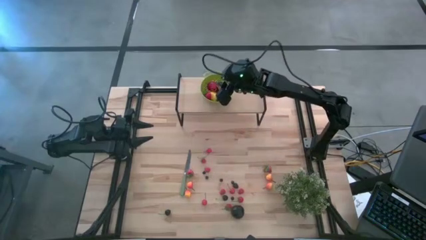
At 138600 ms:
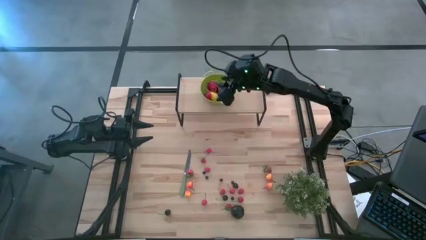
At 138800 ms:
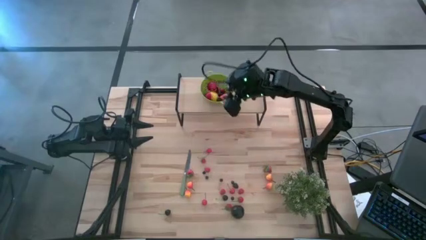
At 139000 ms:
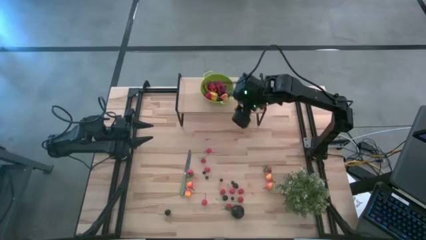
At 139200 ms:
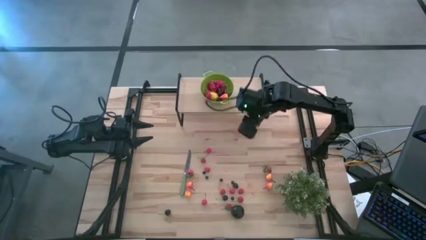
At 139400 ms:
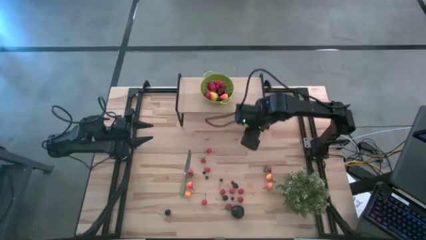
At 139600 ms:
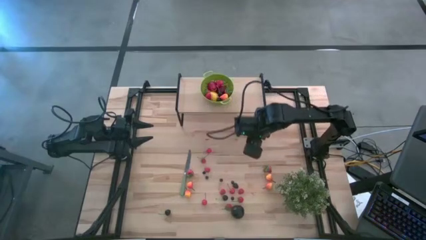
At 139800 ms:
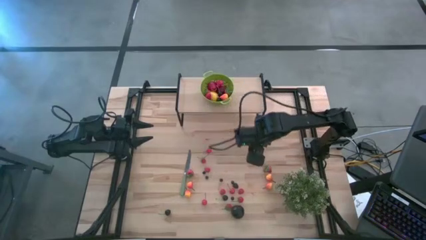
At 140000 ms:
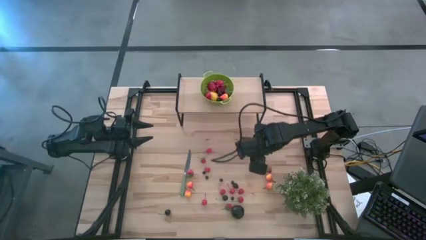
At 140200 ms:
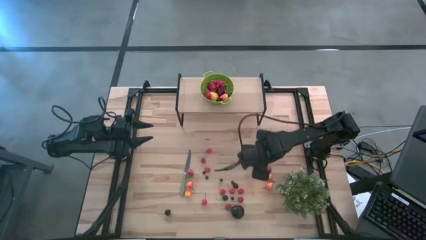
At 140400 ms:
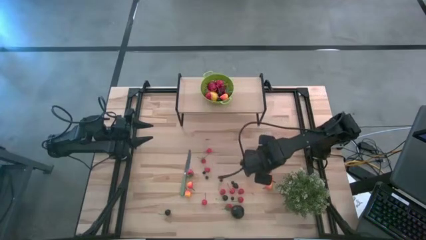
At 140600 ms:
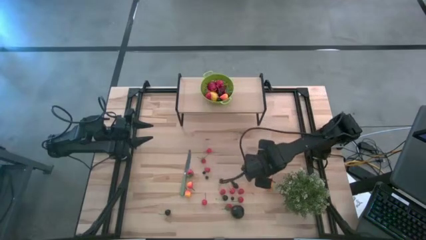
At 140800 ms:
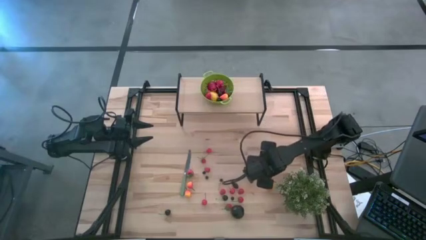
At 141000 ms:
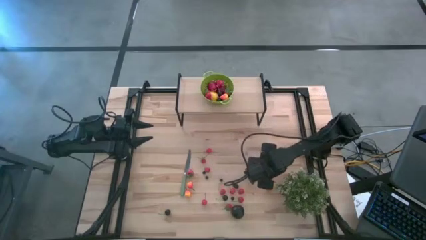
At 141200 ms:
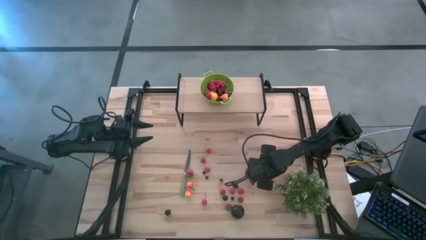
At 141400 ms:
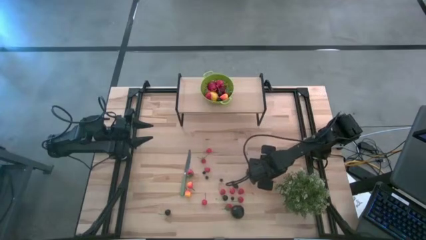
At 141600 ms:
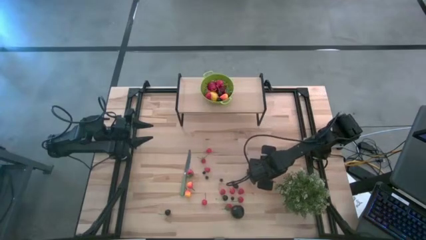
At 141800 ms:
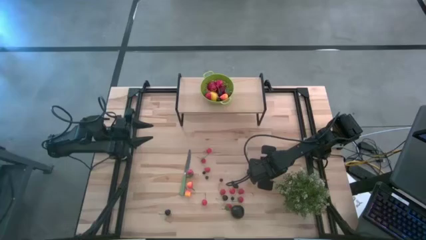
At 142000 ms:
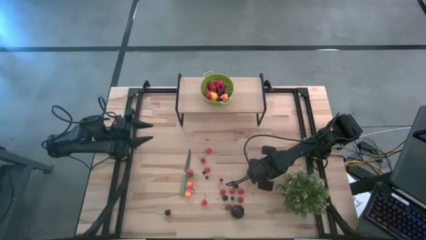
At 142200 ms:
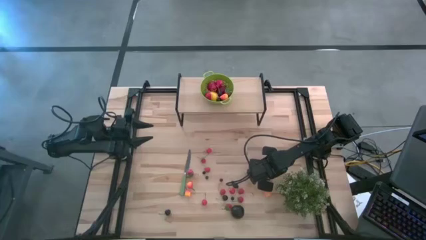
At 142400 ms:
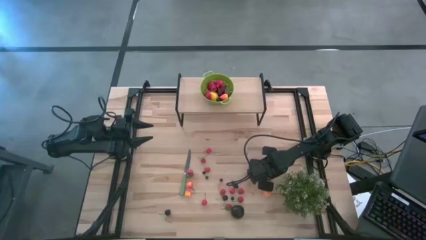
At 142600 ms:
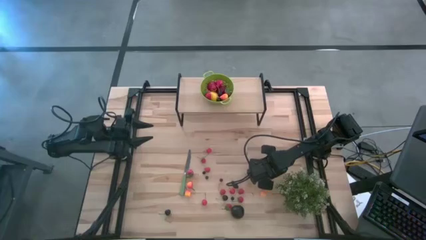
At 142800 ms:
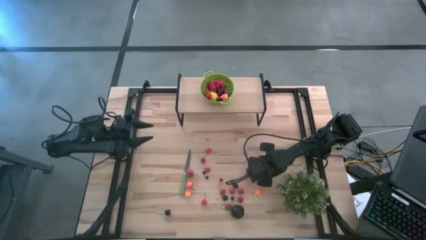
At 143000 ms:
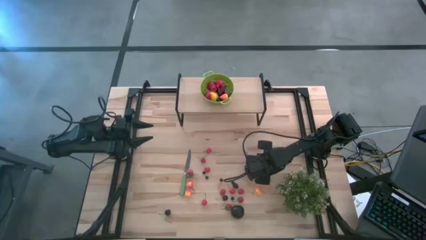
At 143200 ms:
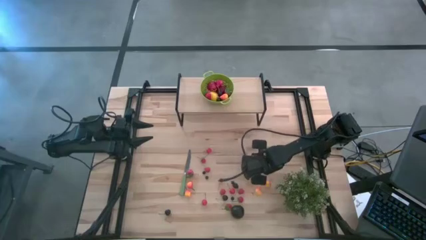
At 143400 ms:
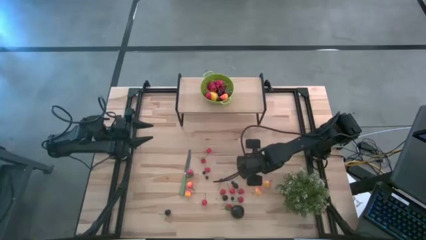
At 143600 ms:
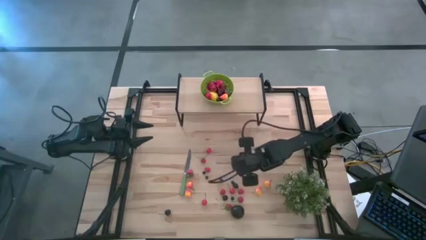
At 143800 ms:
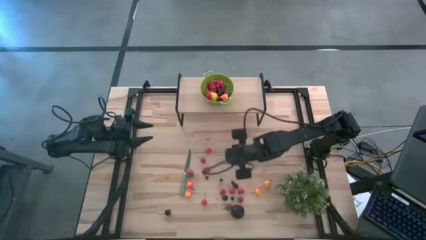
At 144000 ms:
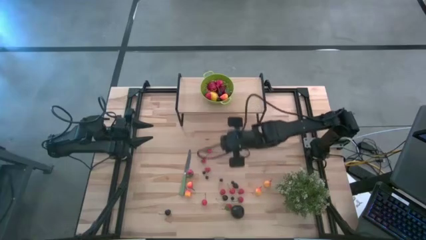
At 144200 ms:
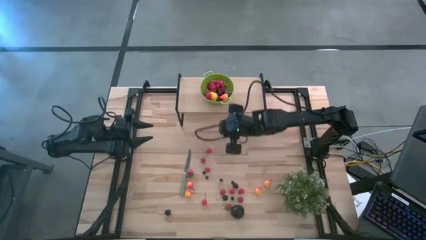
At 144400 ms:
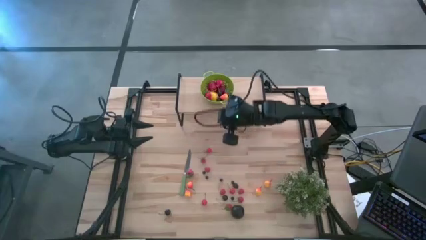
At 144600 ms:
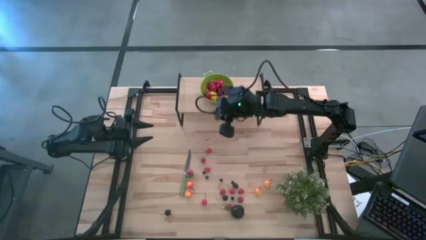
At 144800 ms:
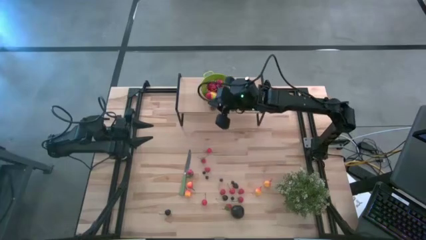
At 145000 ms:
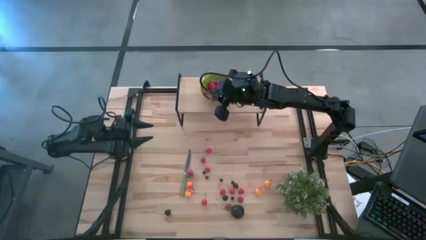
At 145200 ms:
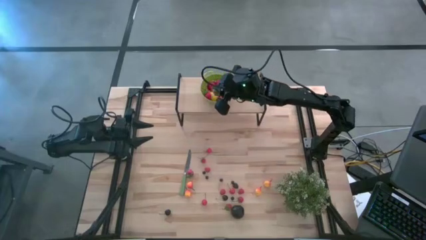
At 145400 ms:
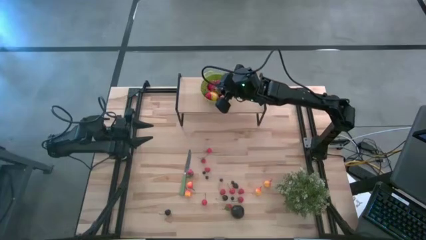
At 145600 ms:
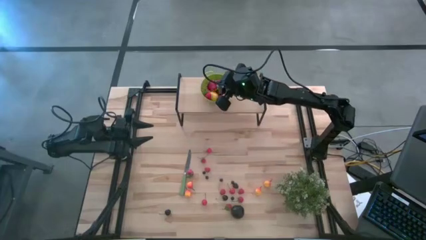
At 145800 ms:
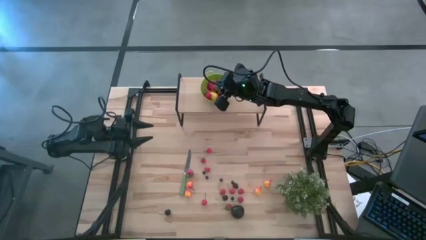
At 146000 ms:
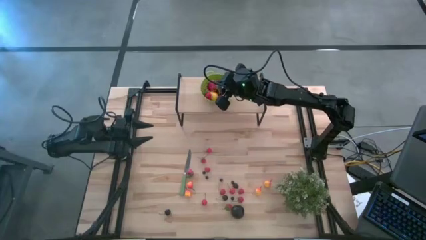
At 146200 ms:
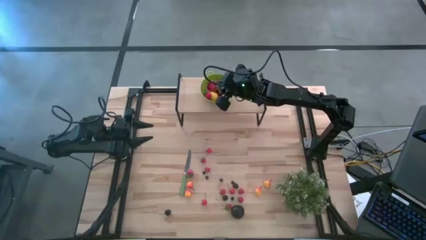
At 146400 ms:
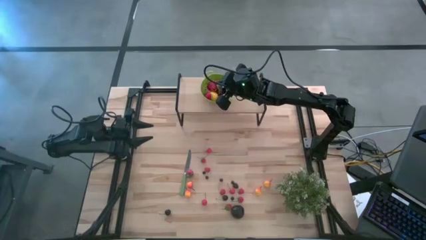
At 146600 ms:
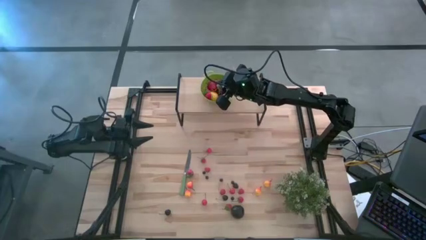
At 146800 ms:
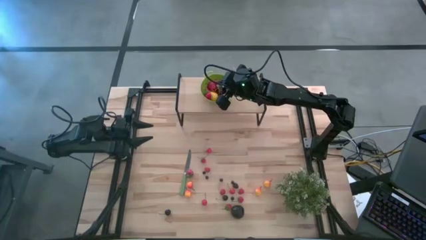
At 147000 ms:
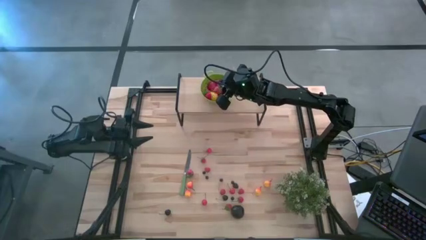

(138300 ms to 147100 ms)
Task: Pick & Place Fruit
Put the strawberry into the green colander on the shelf

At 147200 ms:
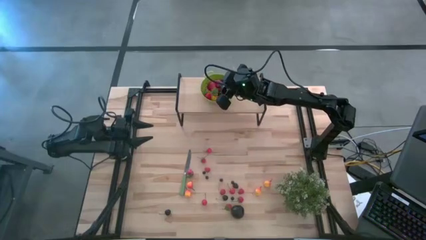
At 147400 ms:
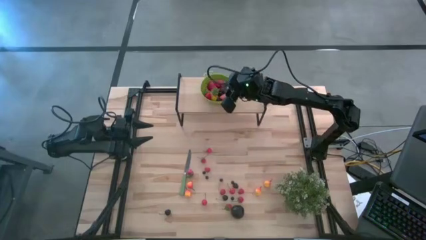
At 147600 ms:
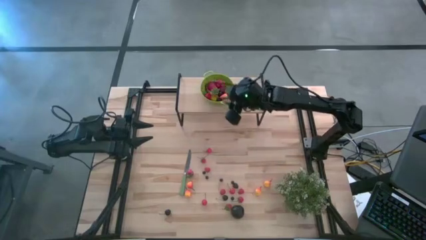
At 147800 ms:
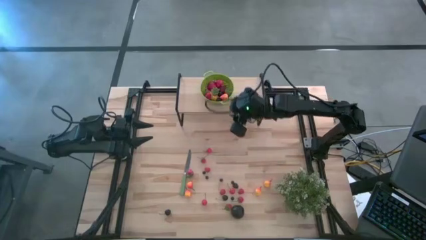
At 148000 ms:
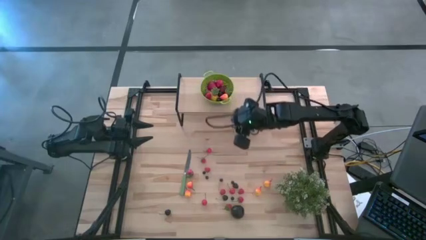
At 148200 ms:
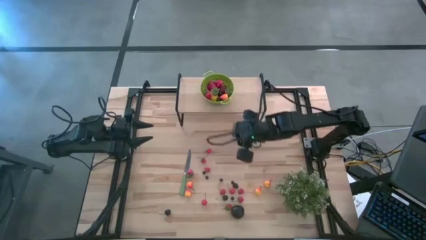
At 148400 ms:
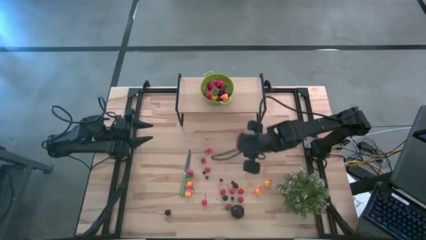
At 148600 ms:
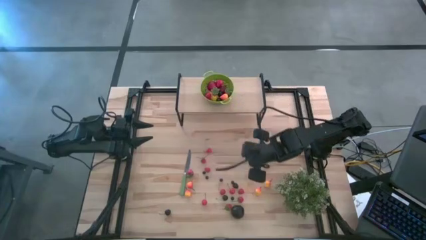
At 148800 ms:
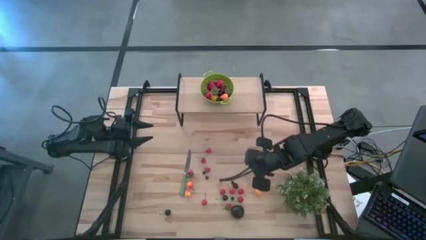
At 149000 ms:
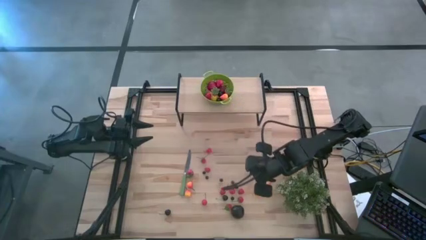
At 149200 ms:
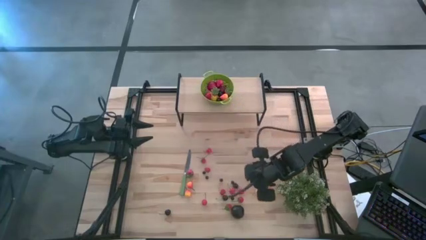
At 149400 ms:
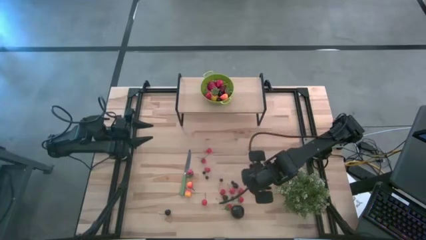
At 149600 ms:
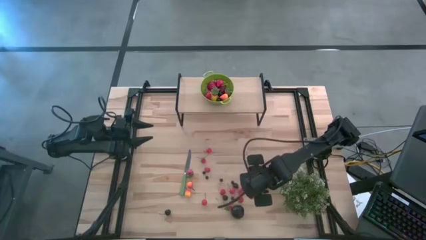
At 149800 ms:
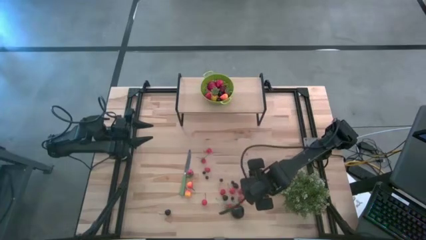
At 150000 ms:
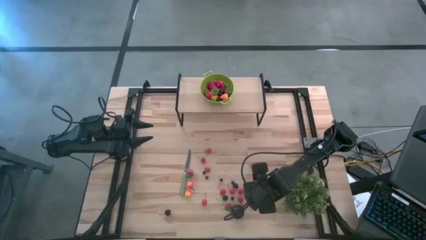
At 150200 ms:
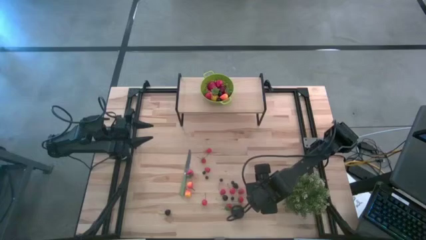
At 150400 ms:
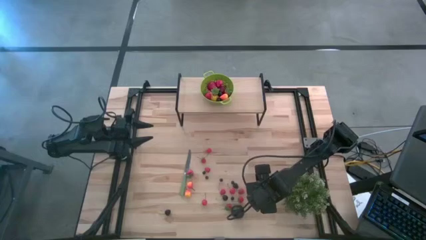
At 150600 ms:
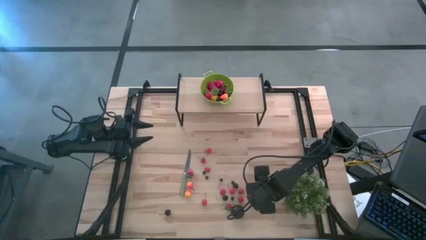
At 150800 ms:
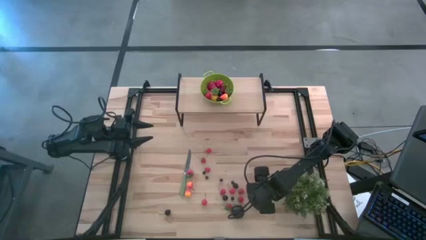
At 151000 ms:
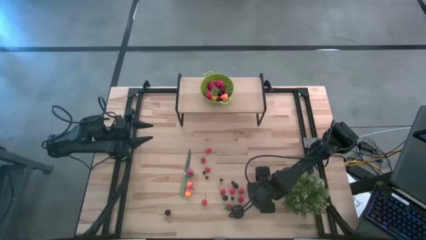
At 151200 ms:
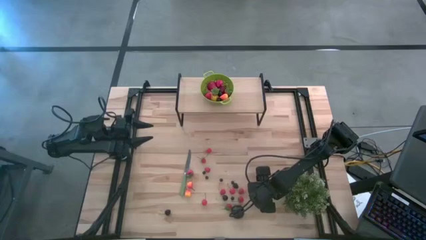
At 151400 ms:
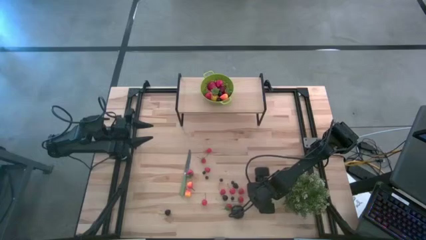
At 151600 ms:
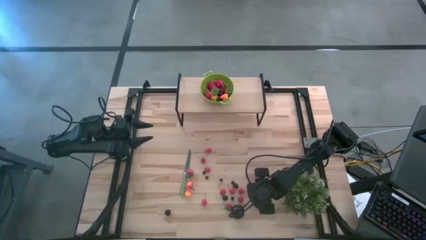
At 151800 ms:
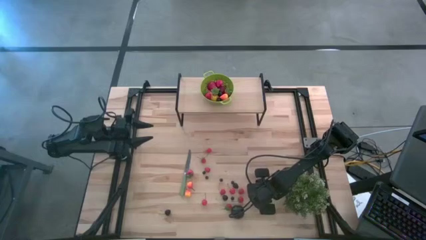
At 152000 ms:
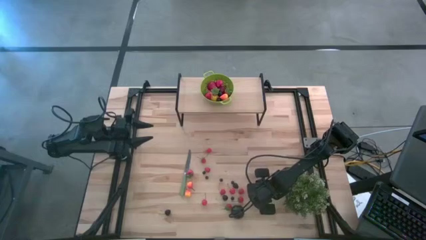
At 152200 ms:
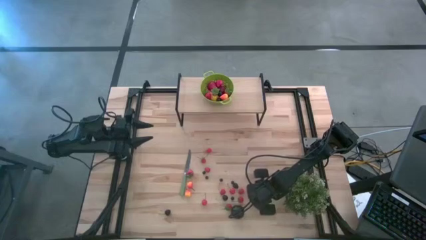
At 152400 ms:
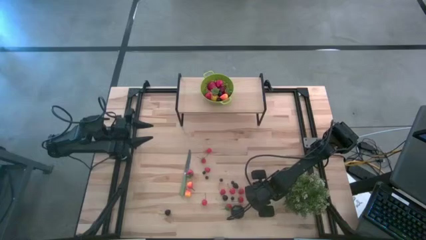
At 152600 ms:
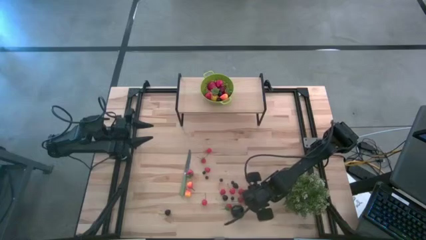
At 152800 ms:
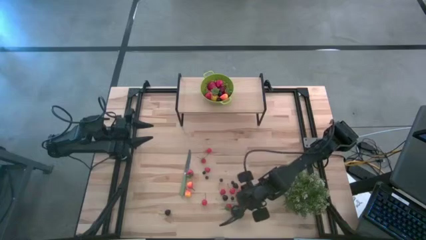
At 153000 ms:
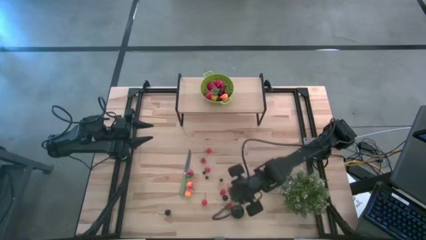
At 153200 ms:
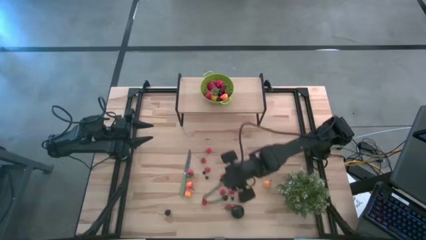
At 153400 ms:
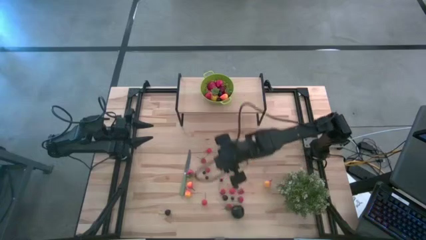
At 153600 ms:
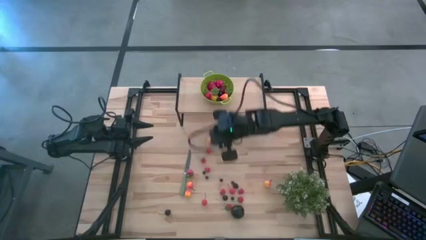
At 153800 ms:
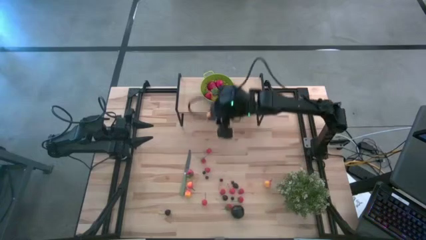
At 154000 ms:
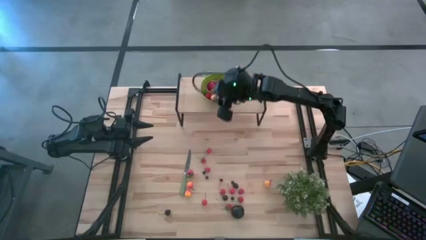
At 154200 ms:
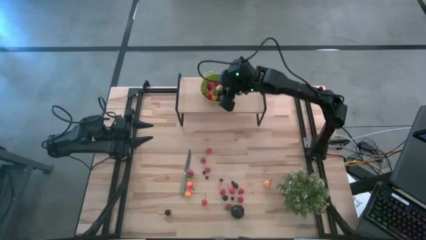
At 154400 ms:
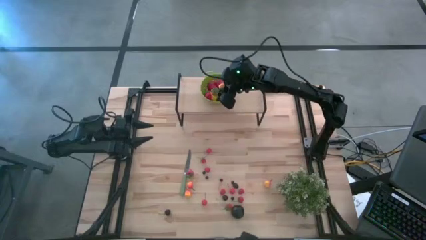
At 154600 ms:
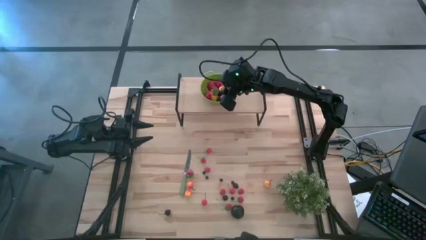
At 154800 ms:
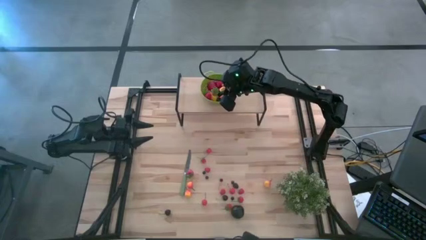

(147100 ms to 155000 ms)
Put the pear into the green colander on the shelf
